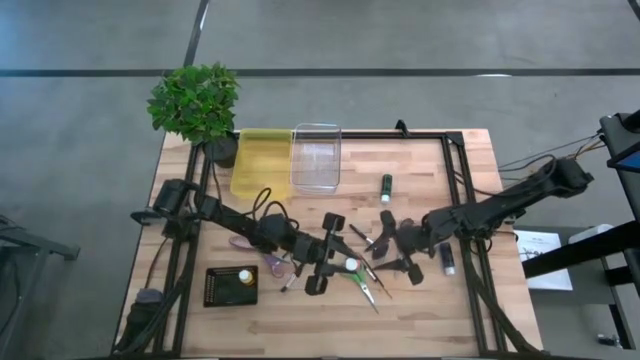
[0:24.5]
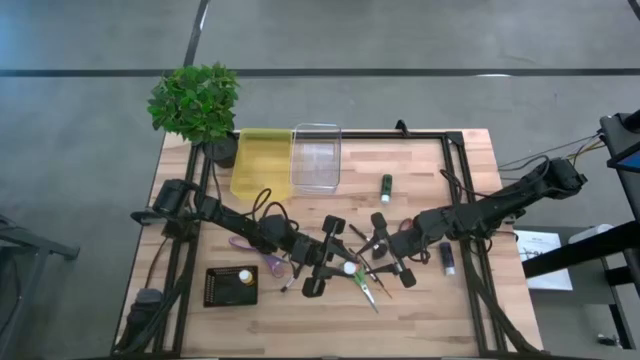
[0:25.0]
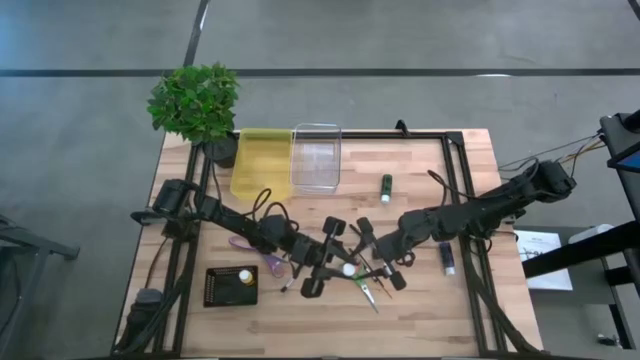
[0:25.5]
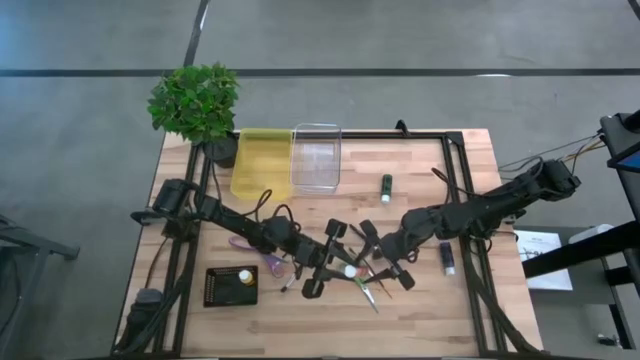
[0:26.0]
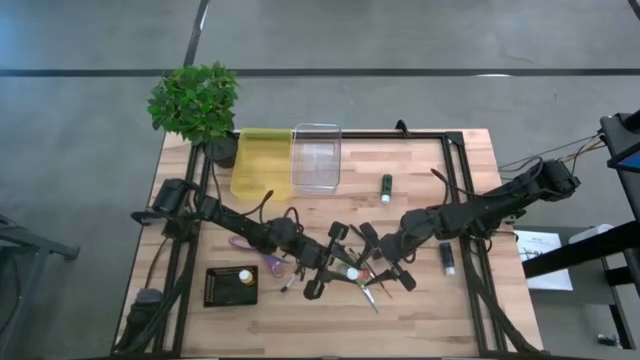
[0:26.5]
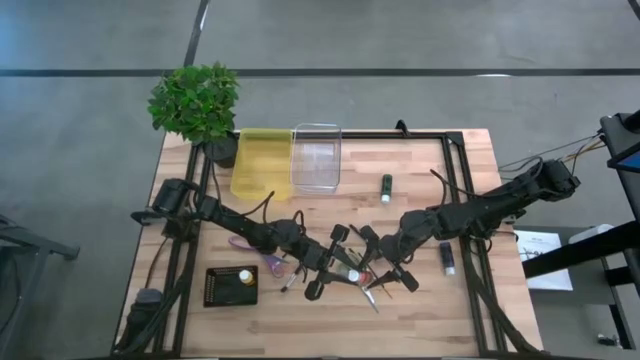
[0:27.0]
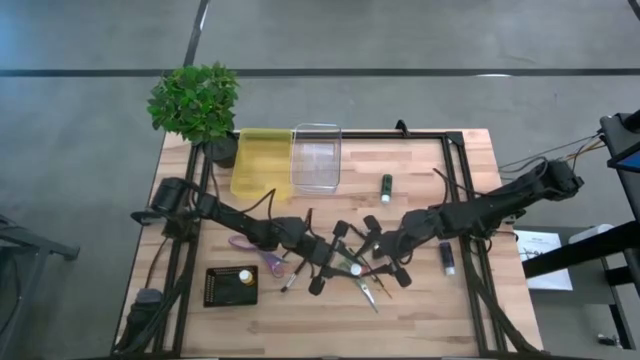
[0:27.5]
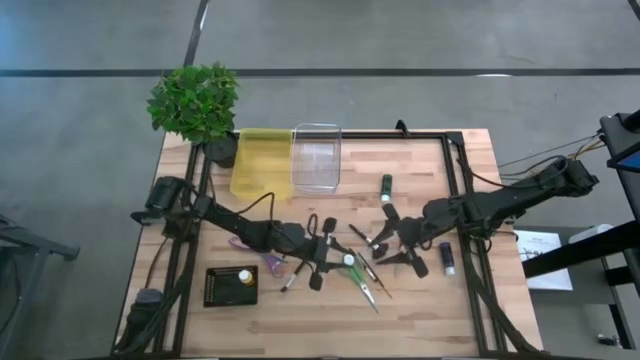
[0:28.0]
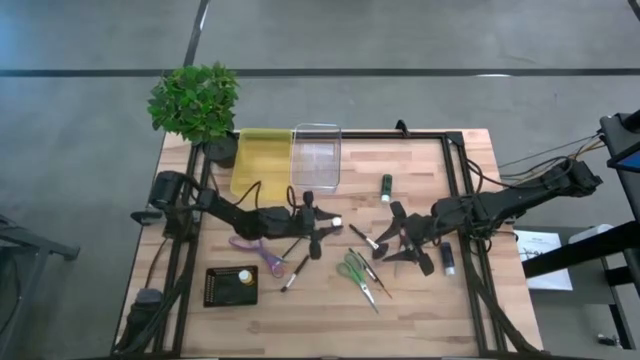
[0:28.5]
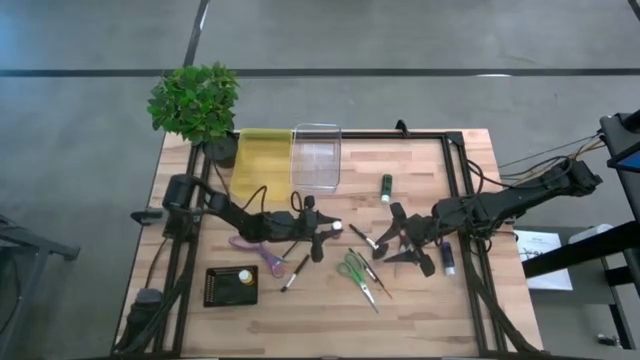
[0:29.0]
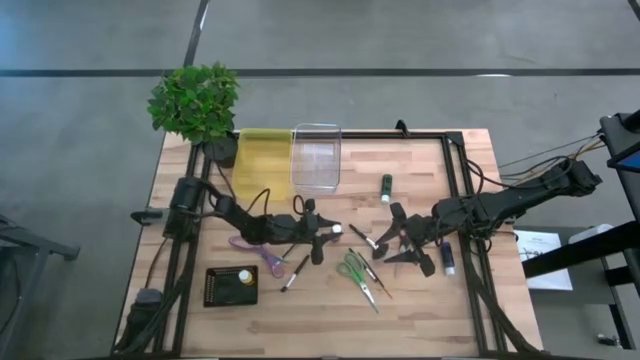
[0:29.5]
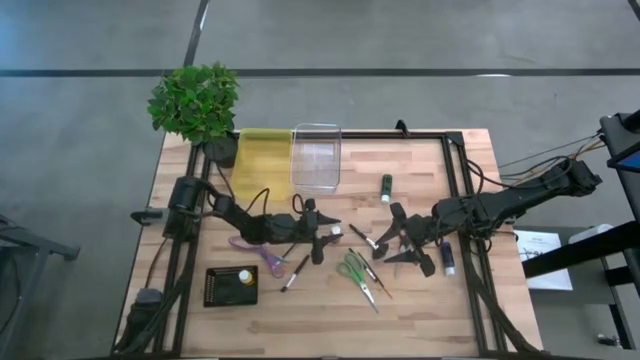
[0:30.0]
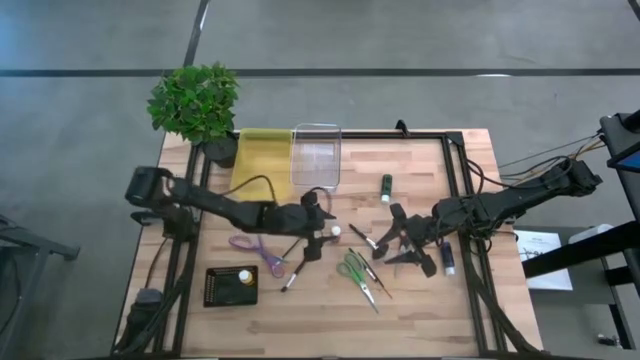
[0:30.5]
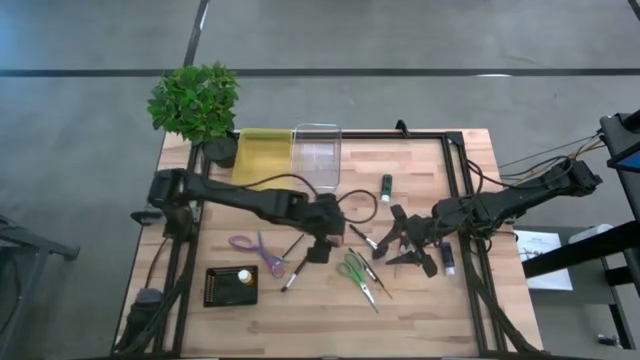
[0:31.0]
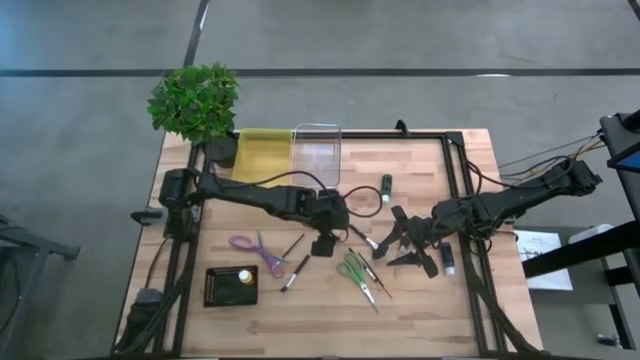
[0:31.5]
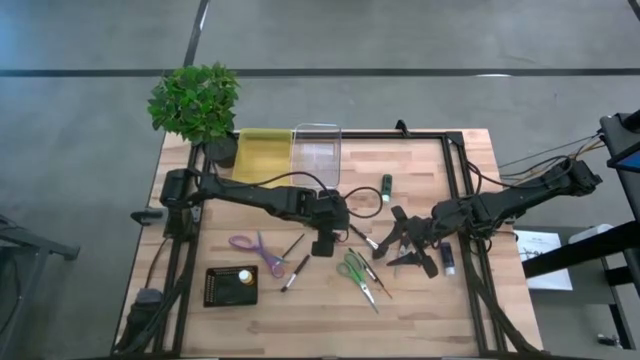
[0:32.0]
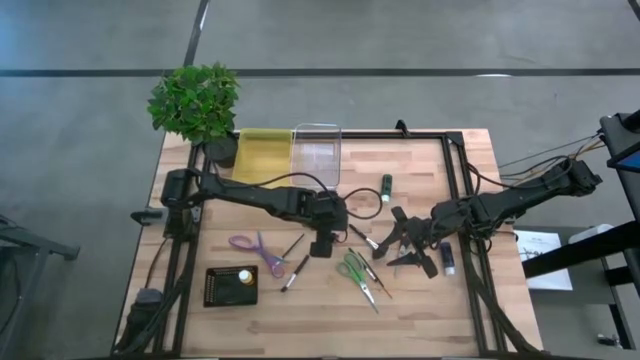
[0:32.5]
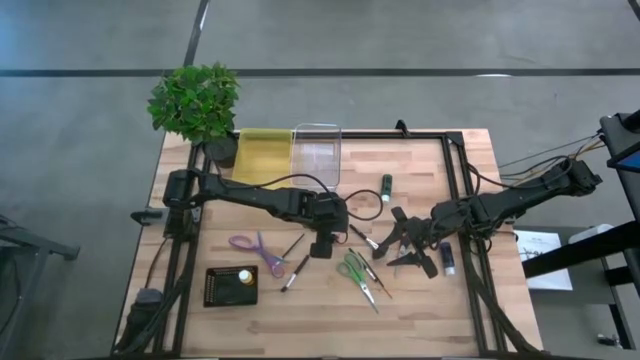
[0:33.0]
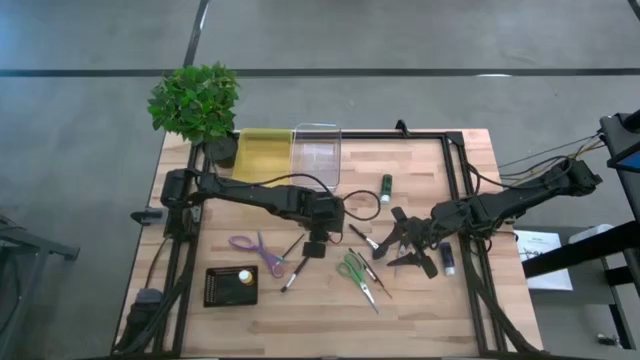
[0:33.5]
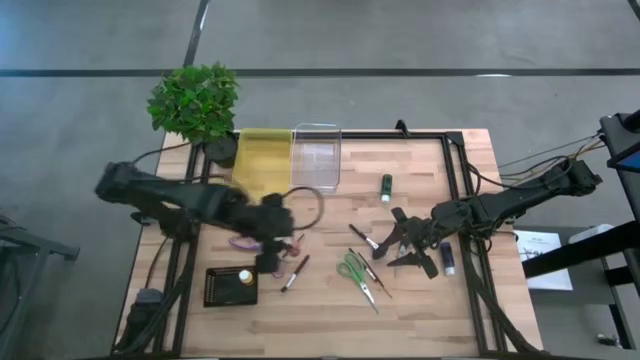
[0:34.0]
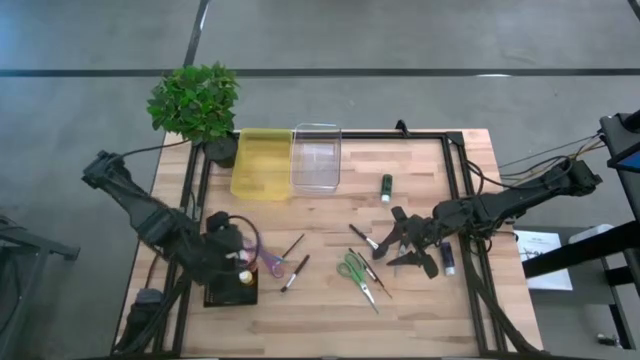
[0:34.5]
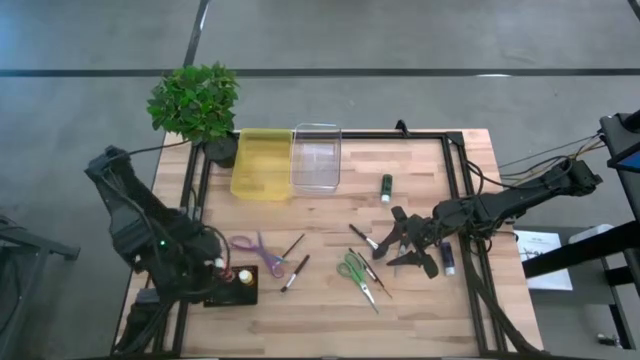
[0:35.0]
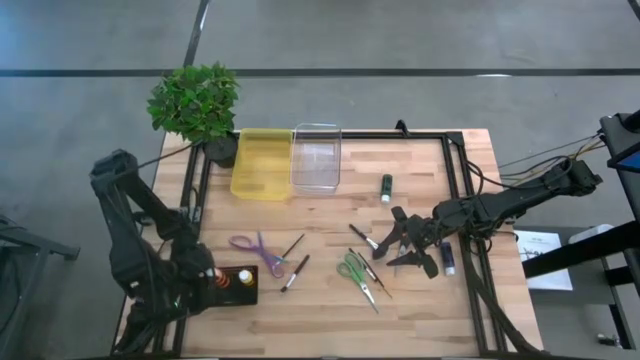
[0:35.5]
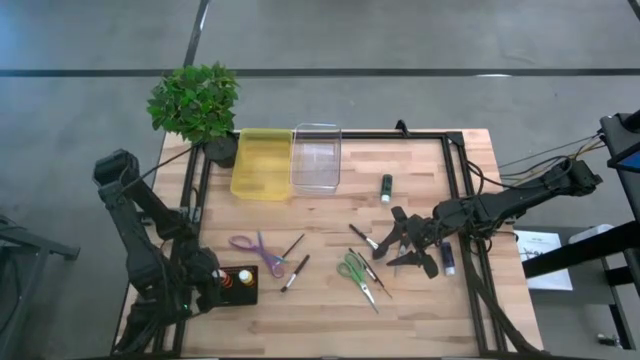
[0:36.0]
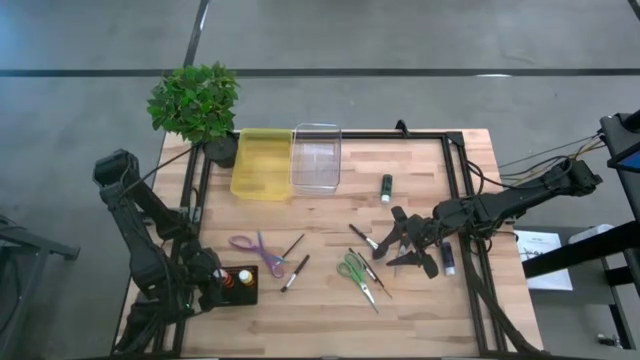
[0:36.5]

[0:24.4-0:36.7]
Task: Pick & Place Paint Supplies
Put the orange paint bottle into the black bin

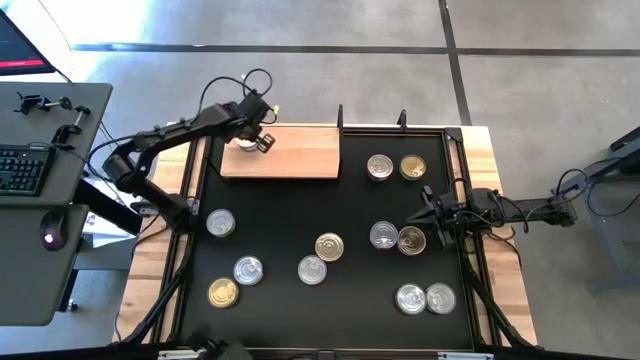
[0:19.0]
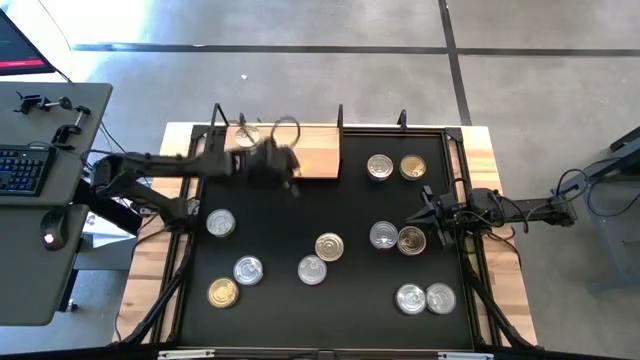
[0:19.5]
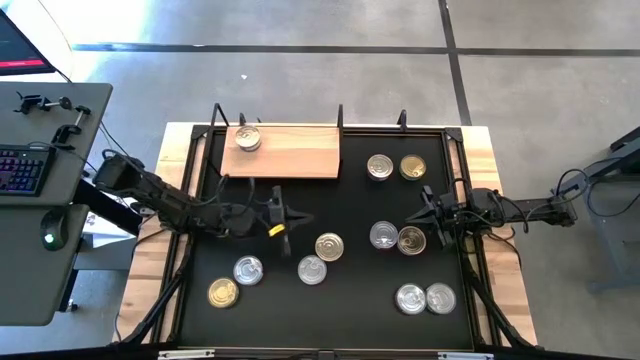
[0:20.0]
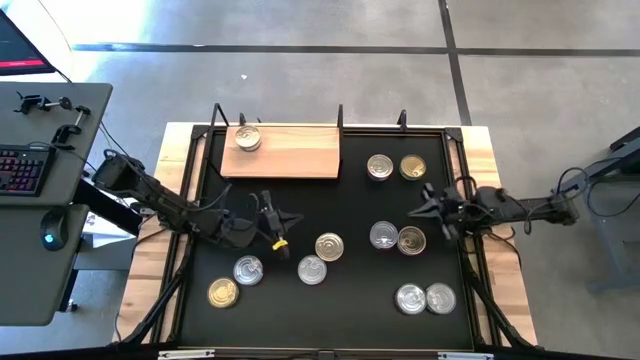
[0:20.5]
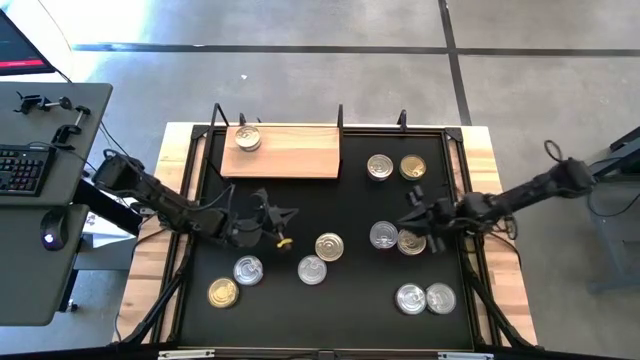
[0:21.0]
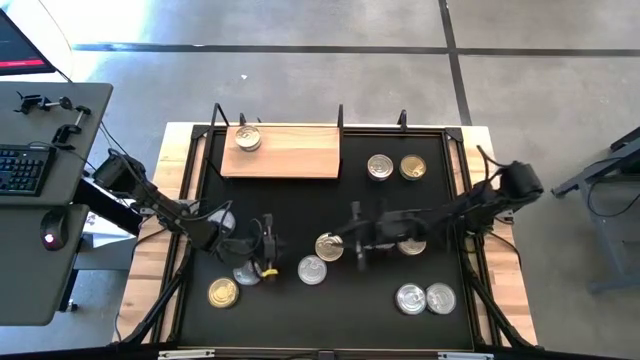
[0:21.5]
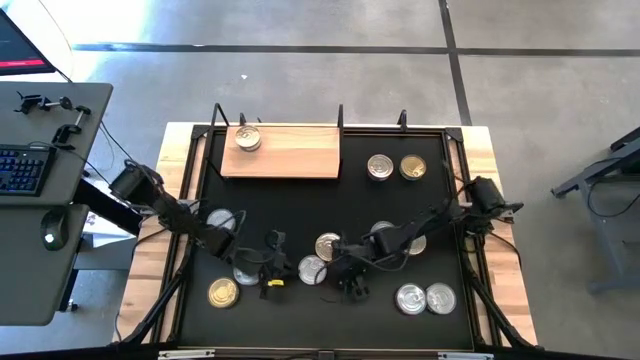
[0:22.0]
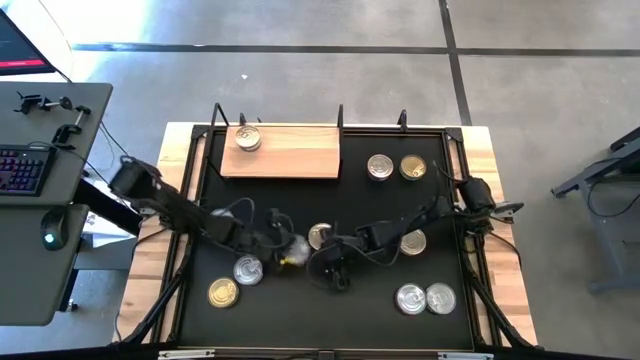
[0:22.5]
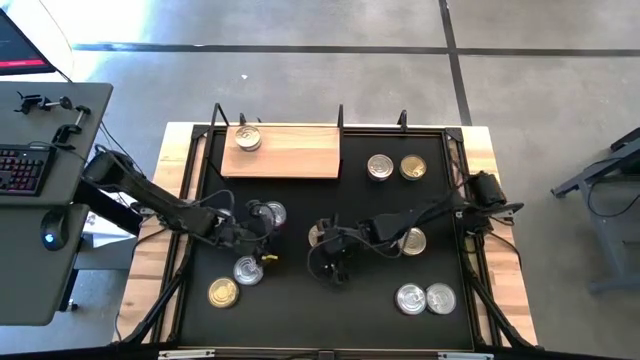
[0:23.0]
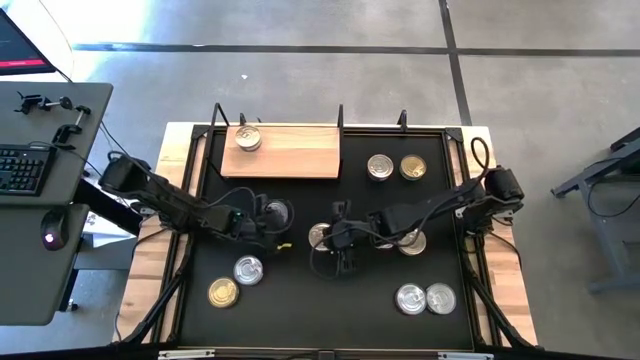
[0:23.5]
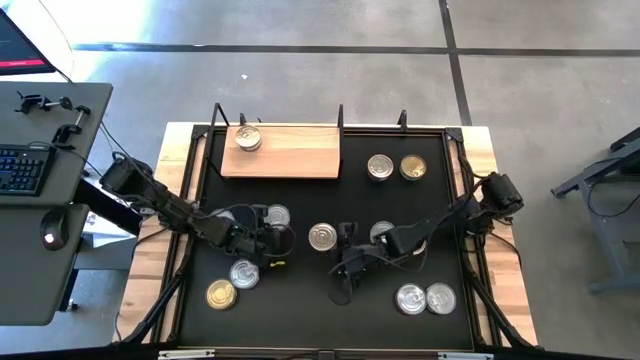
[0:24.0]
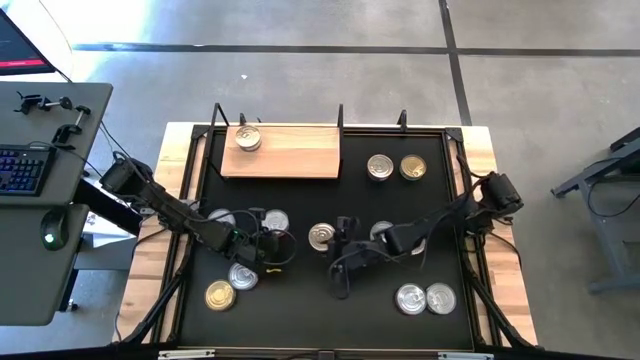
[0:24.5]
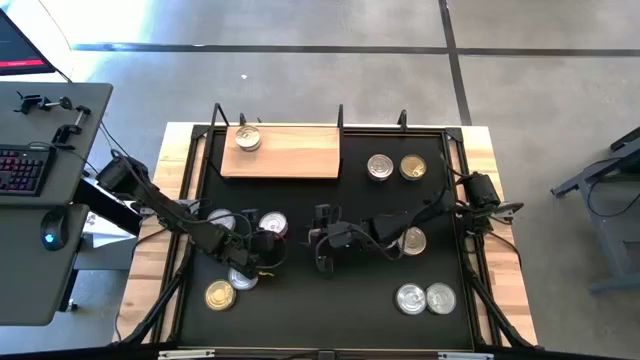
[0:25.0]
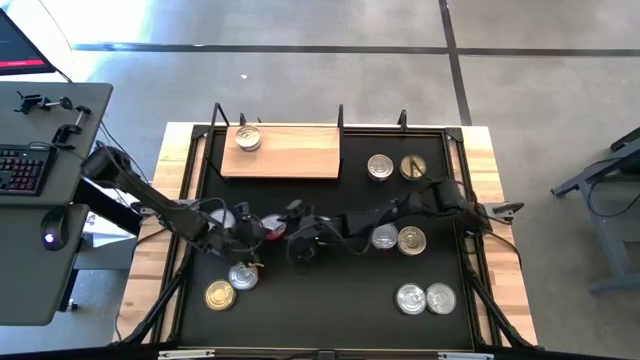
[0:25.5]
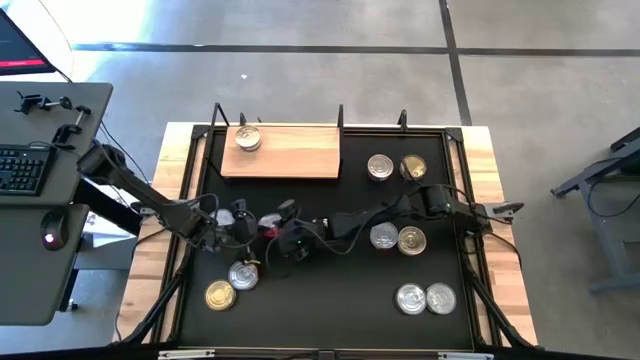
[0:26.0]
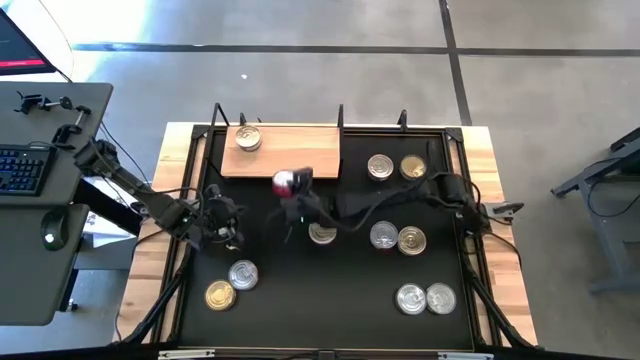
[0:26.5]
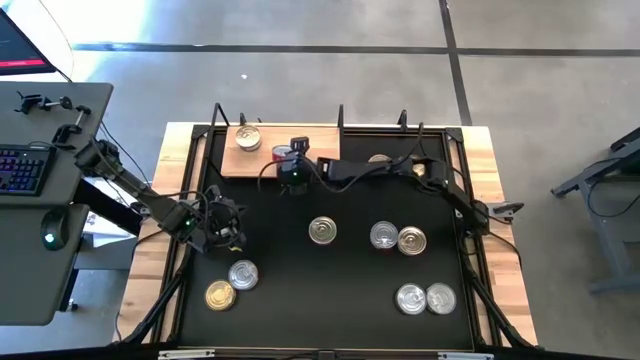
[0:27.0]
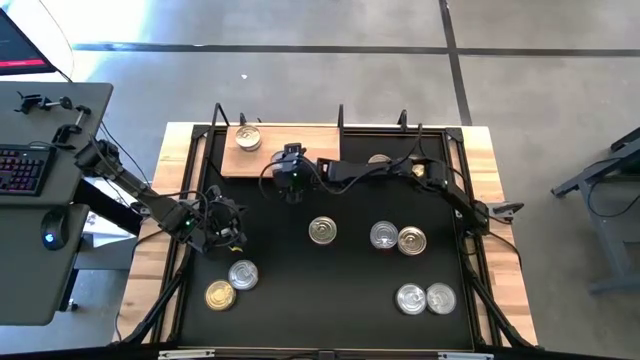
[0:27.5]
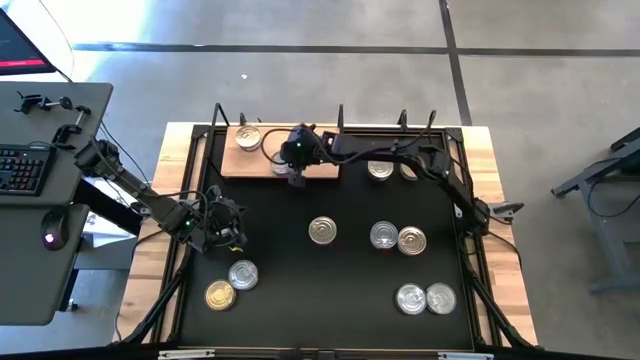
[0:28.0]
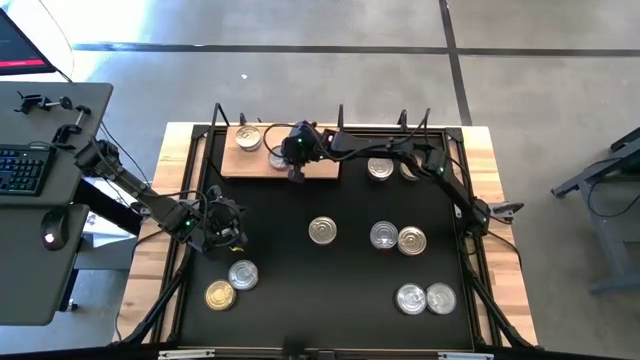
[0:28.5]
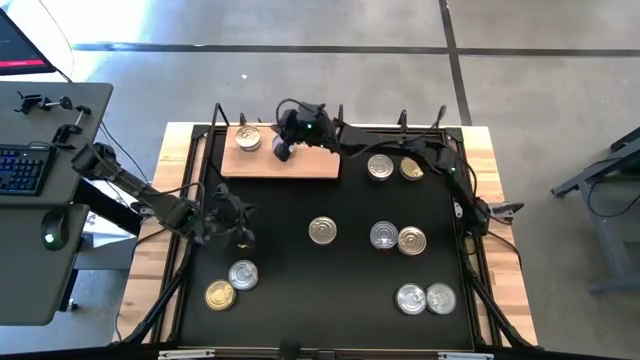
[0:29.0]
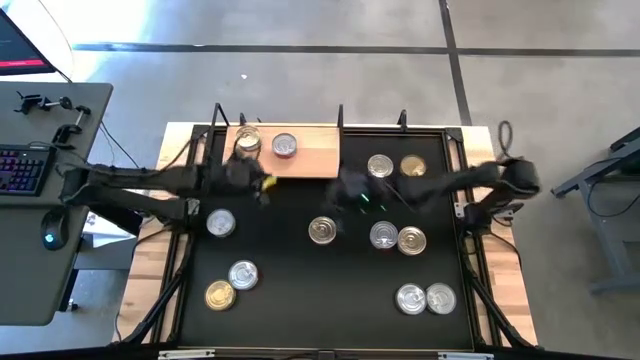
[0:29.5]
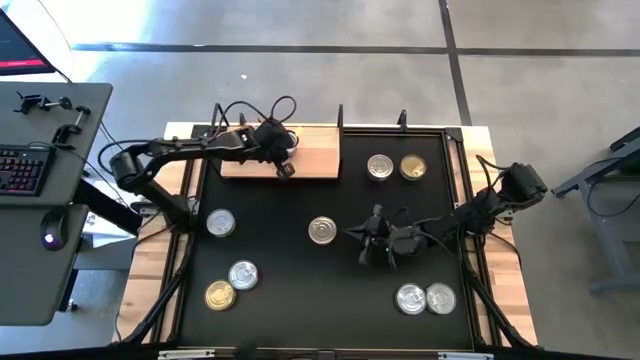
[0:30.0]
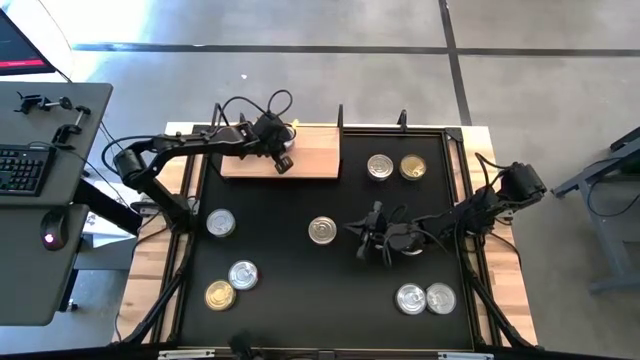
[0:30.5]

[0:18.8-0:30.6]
Task: Stack canned seafood by type on shelf
Put the red tuna can on the shelf
